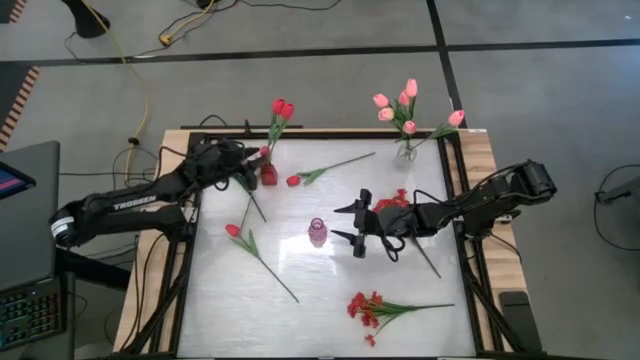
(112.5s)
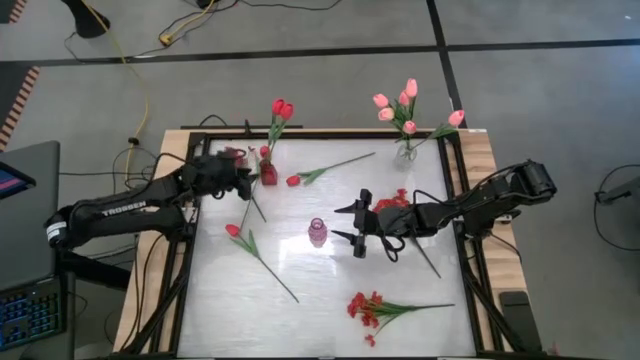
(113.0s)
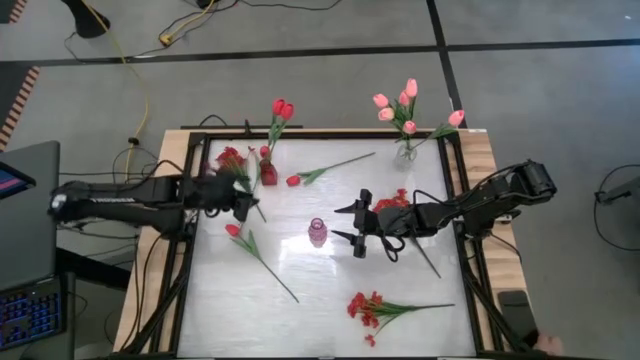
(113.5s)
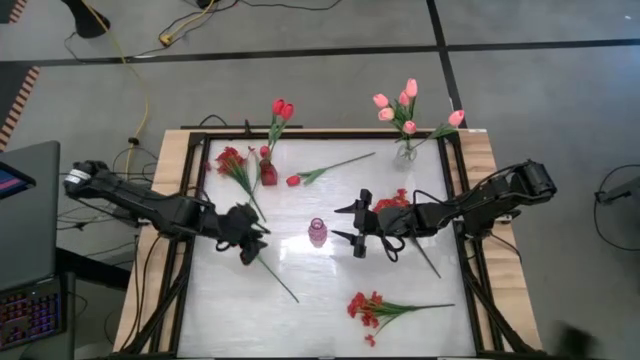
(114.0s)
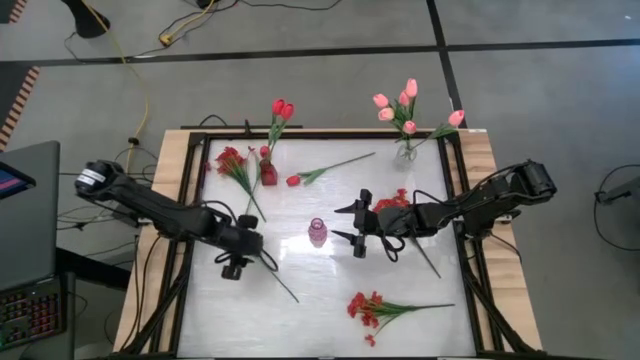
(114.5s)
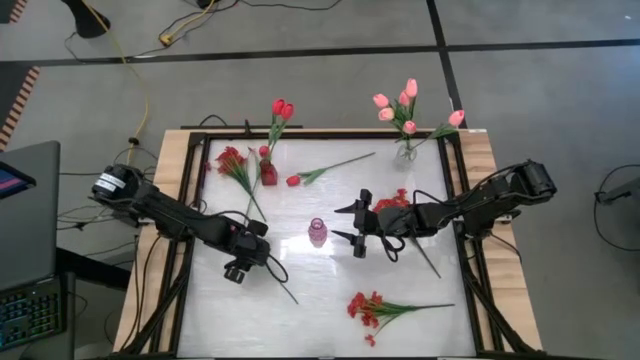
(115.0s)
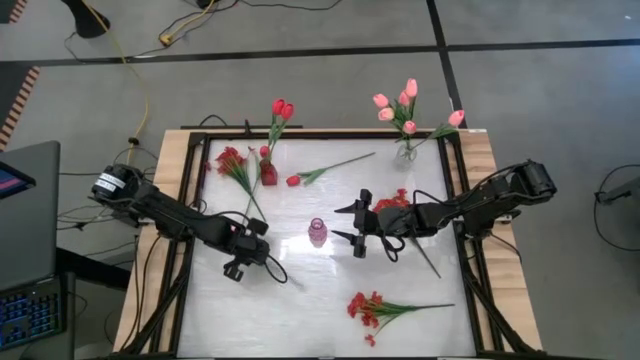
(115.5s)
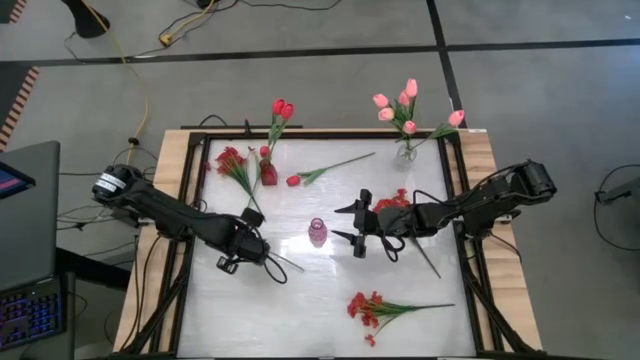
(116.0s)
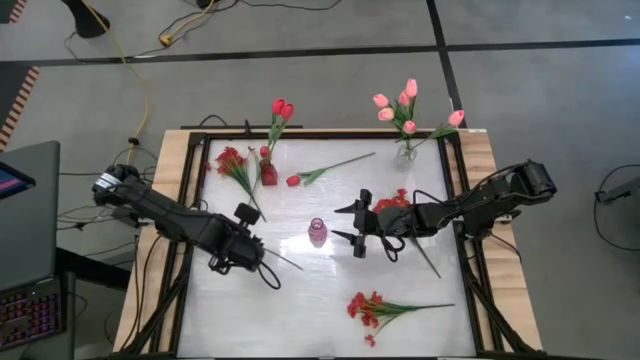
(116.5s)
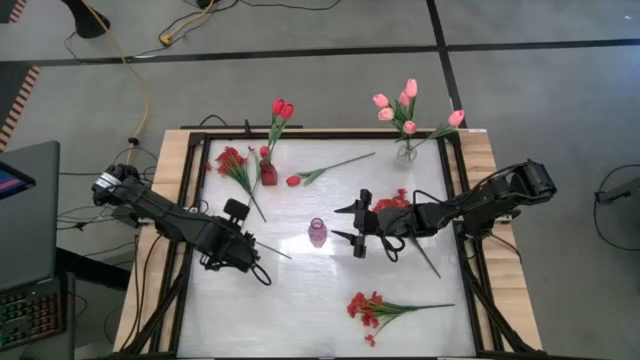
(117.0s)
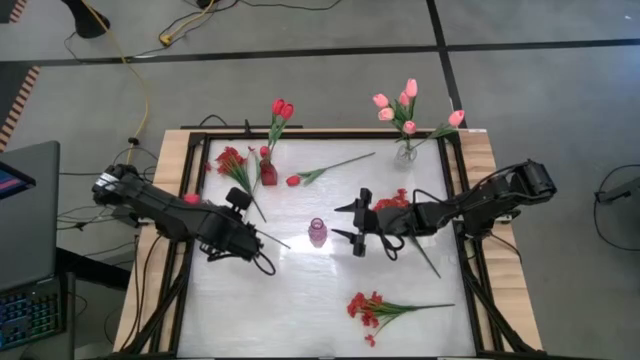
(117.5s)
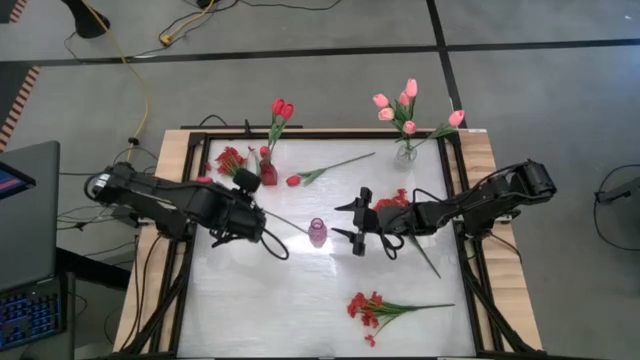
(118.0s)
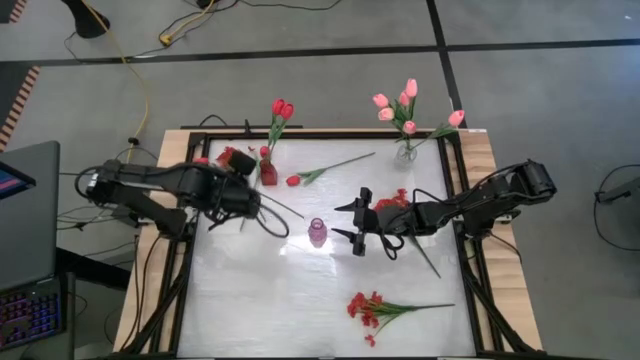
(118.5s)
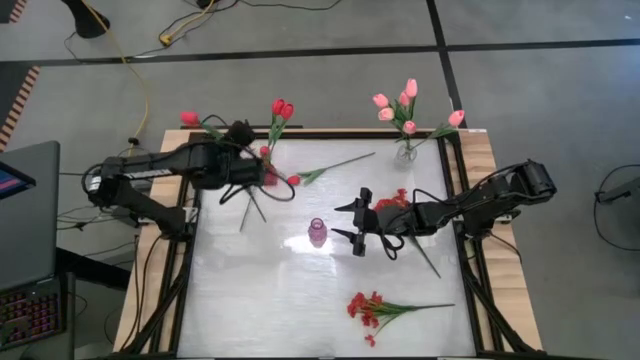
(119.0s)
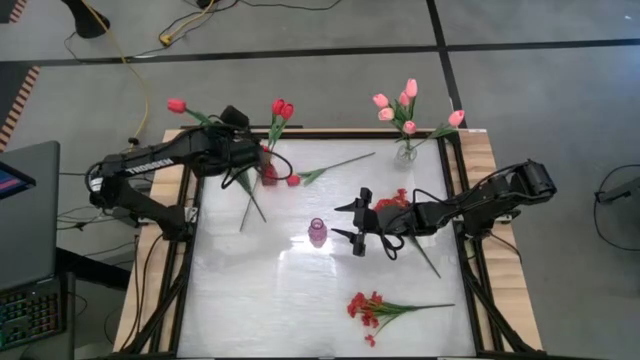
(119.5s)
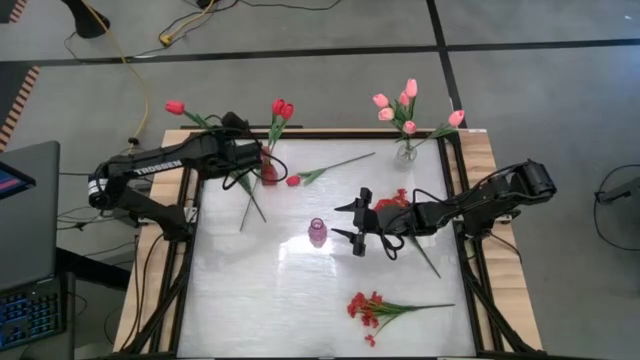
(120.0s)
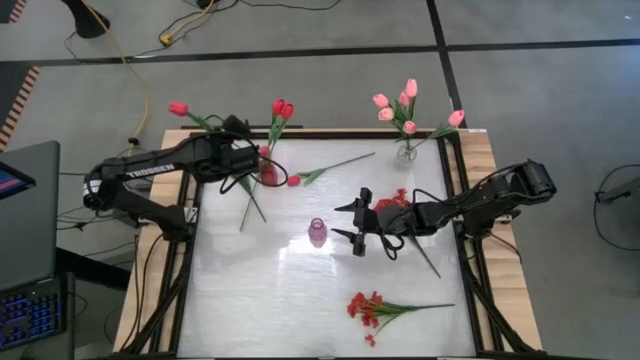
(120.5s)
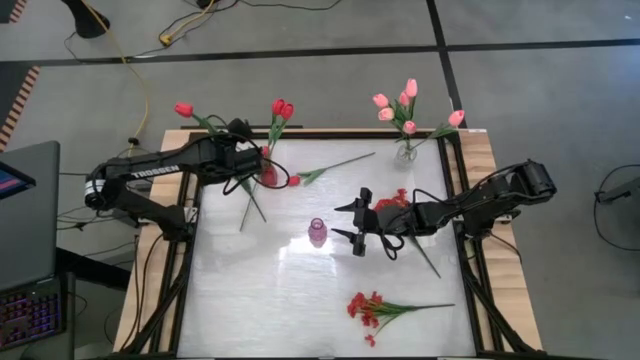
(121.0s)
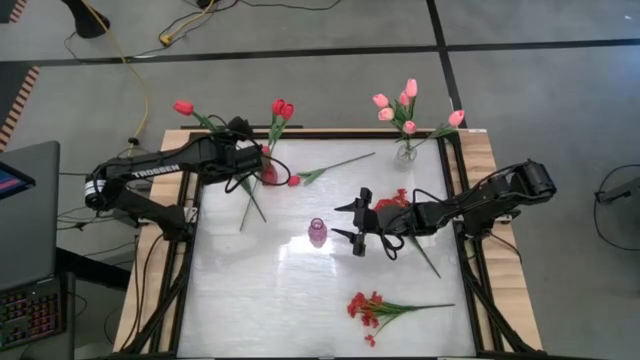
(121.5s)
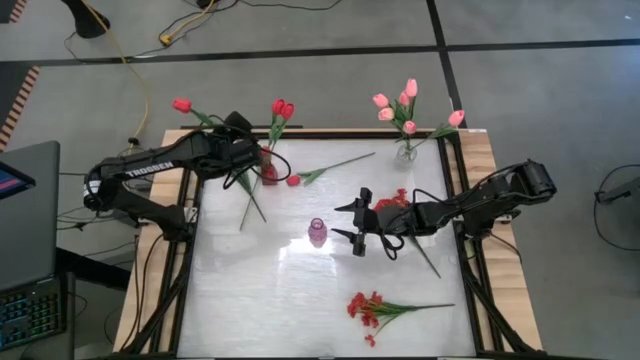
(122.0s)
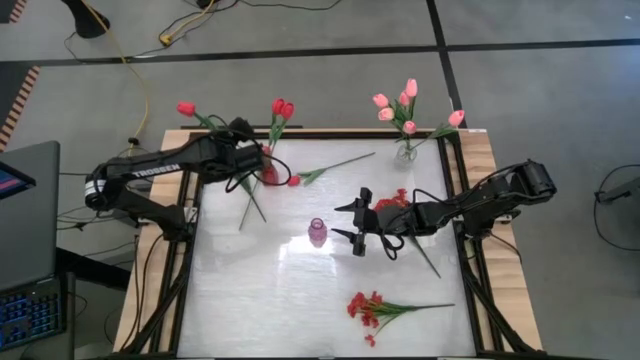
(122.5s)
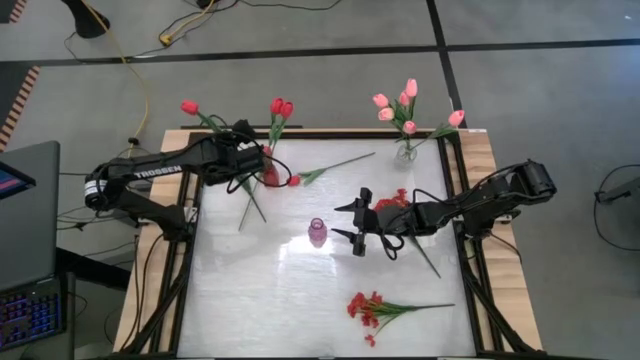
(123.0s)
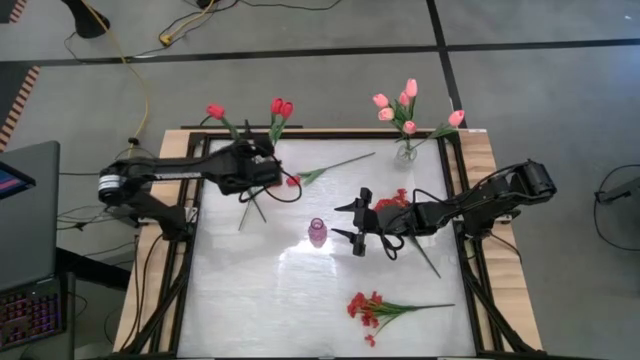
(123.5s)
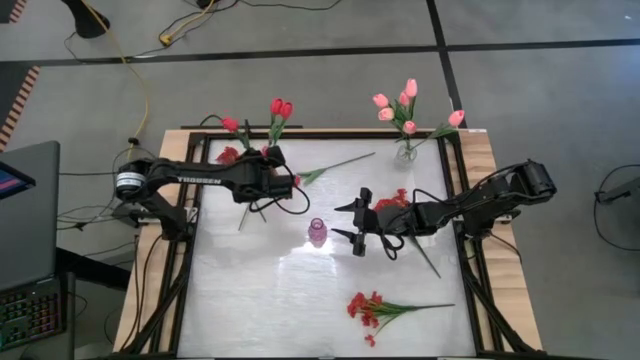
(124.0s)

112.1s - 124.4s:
Task: Sort flowers into vase by color
Put the red flower into the red vase

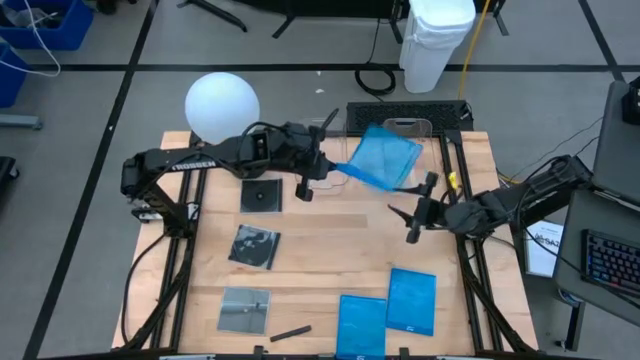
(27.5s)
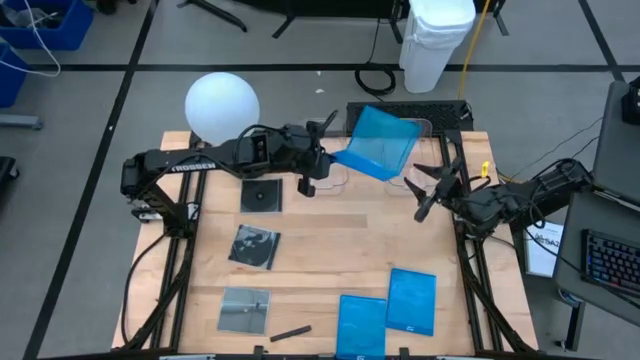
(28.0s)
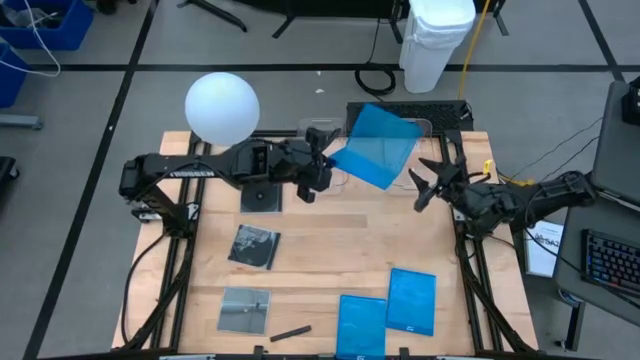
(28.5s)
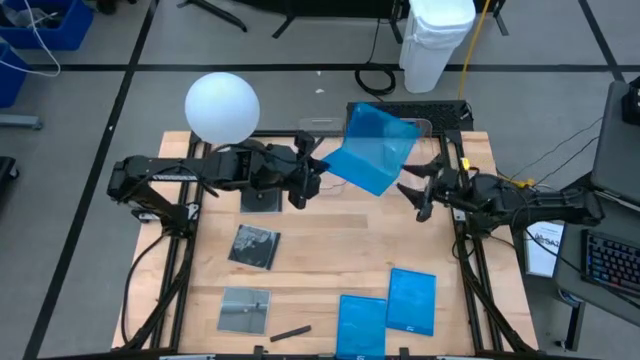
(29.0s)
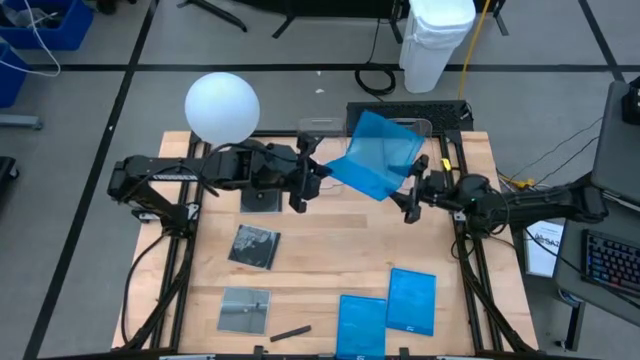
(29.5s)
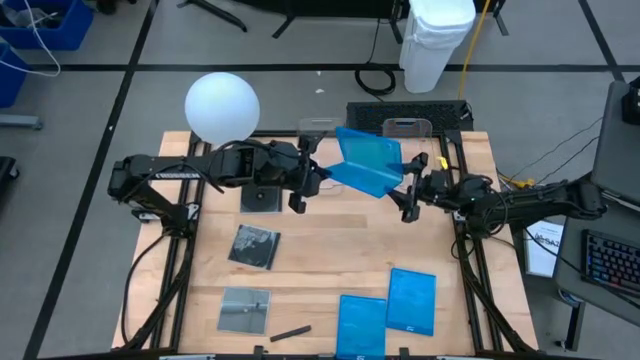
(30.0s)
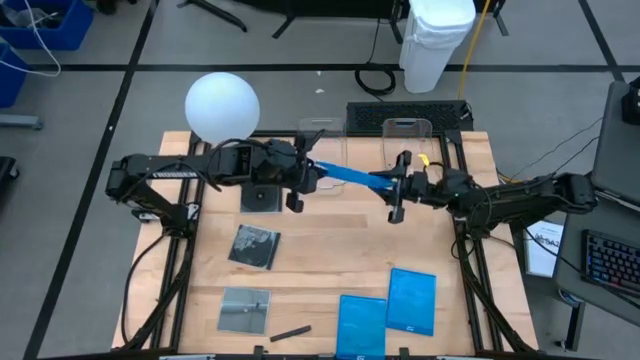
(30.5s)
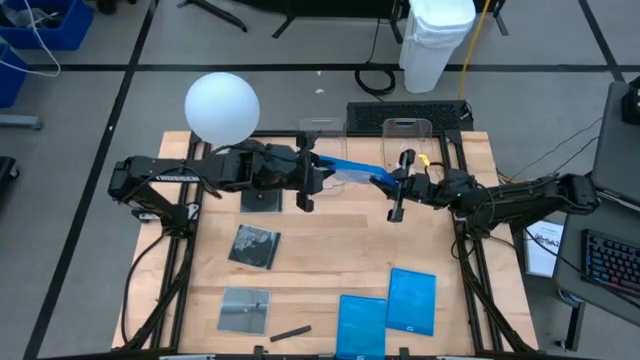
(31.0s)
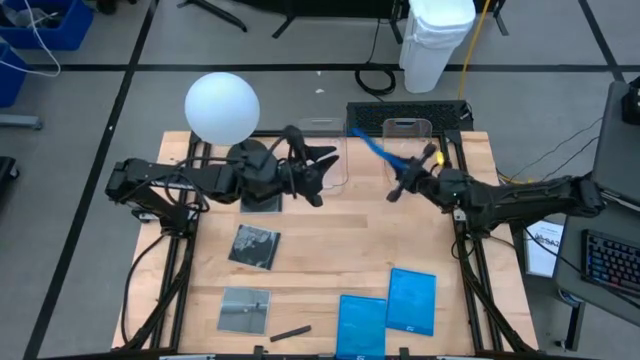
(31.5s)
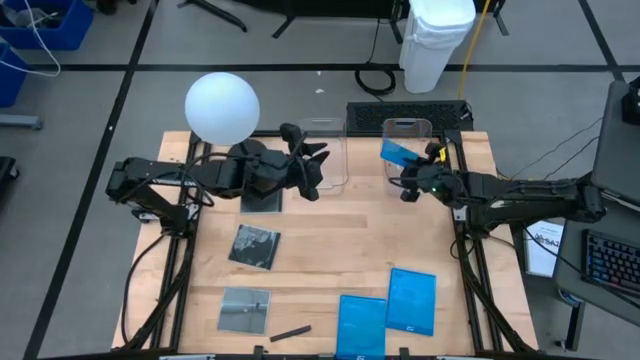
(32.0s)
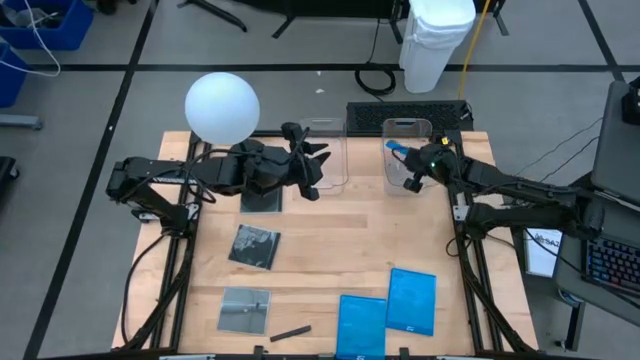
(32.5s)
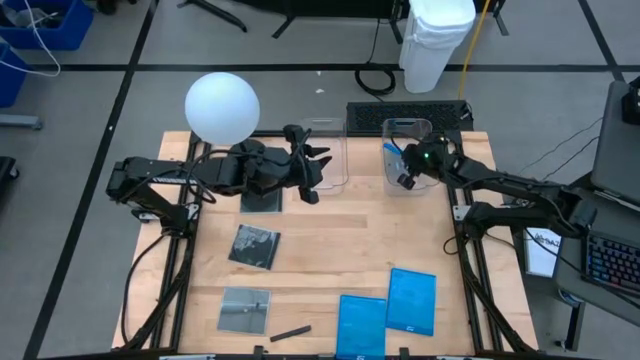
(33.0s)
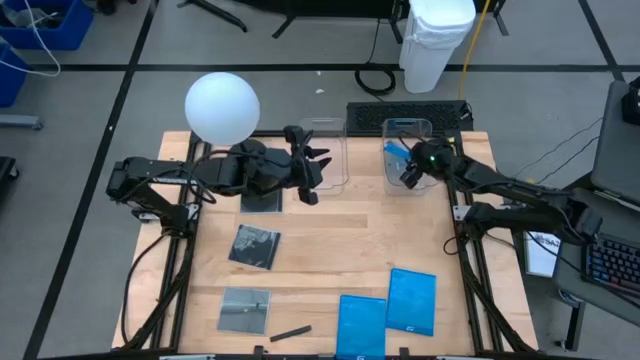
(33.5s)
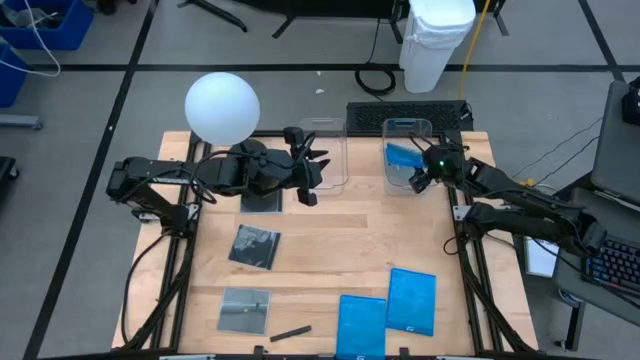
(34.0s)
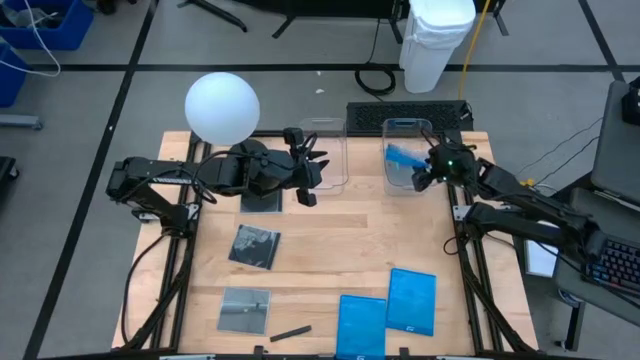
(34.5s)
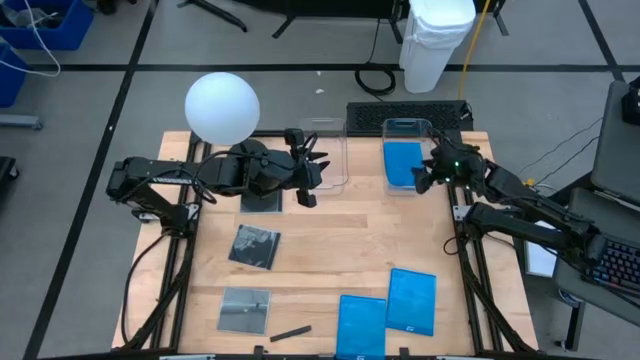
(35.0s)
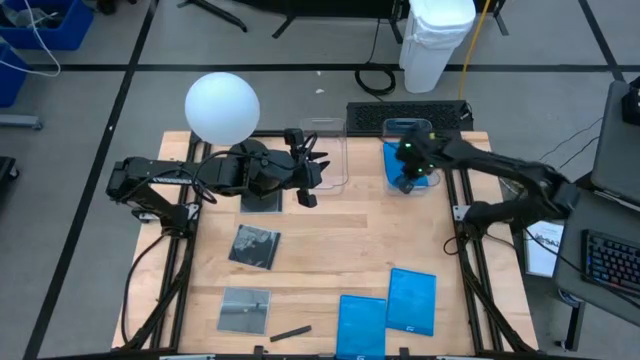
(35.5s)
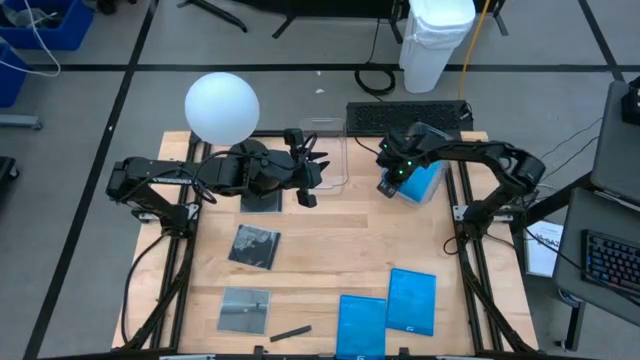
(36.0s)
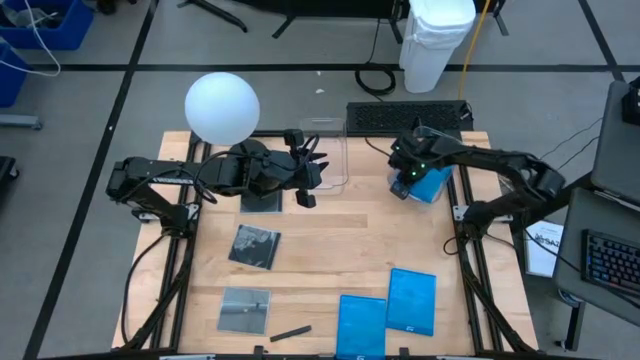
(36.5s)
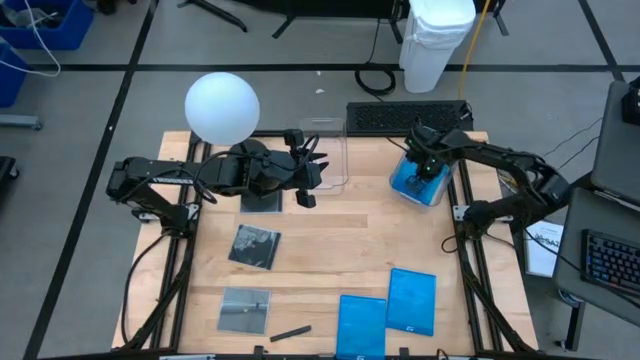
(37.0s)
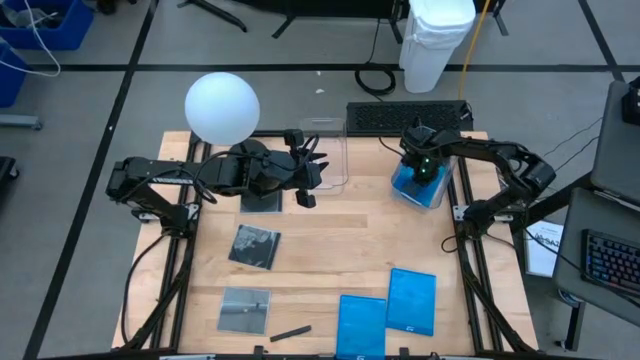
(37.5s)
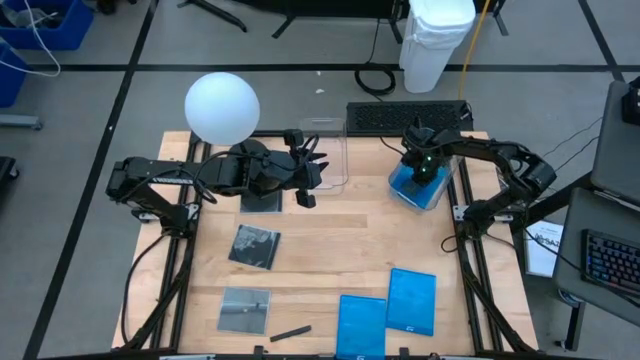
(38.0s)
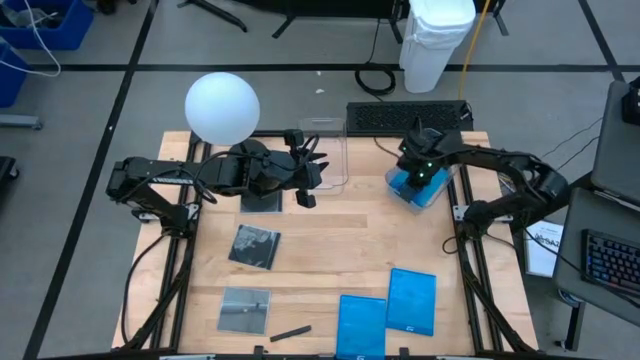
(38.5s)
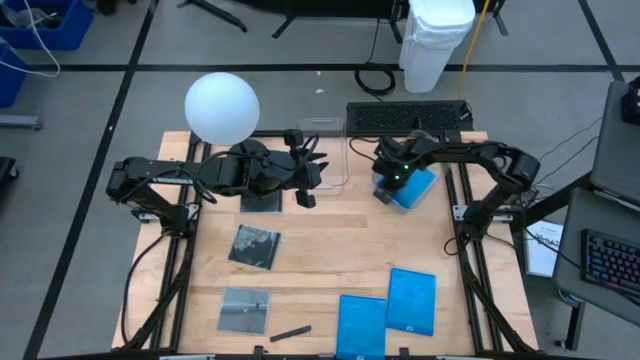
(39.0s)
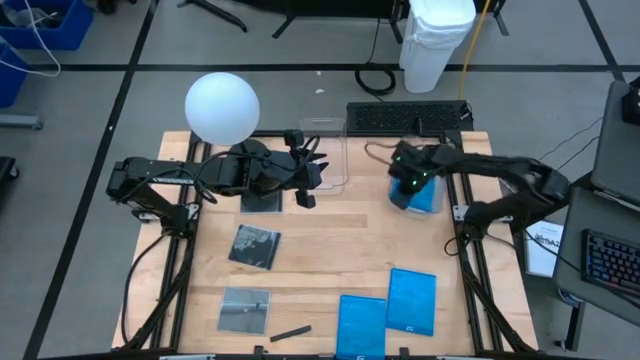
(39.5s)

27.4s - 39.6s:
Task: Pick & place jewel cases by type
Put the top left blue CD case into the right transparent bin
